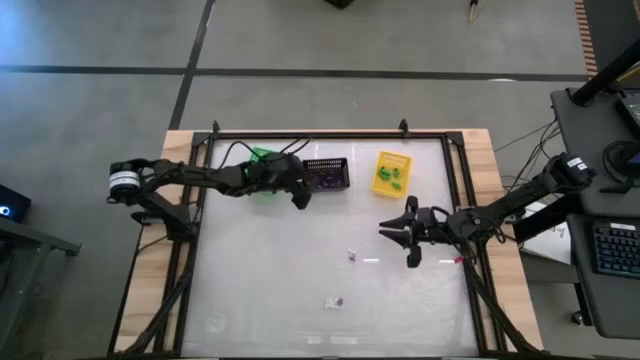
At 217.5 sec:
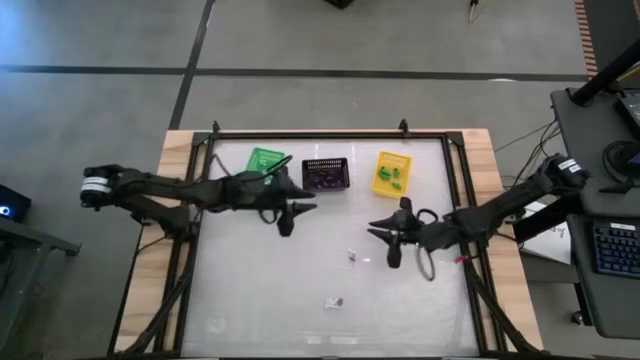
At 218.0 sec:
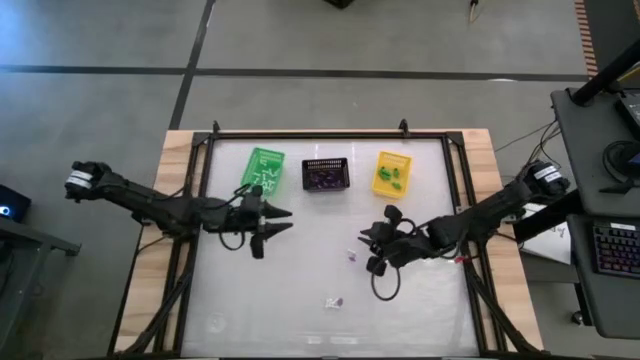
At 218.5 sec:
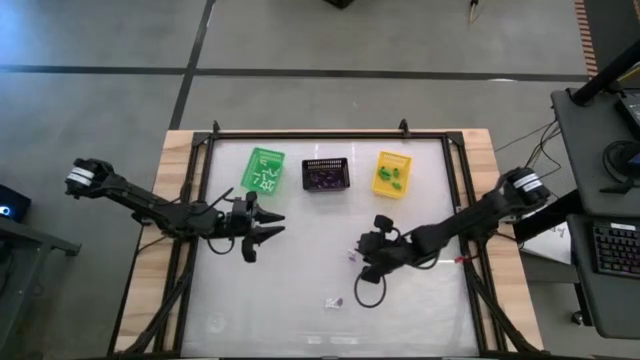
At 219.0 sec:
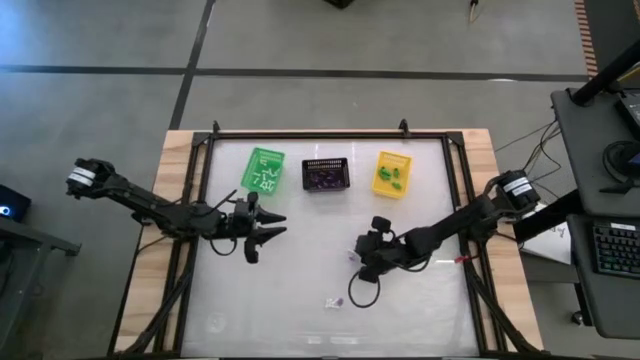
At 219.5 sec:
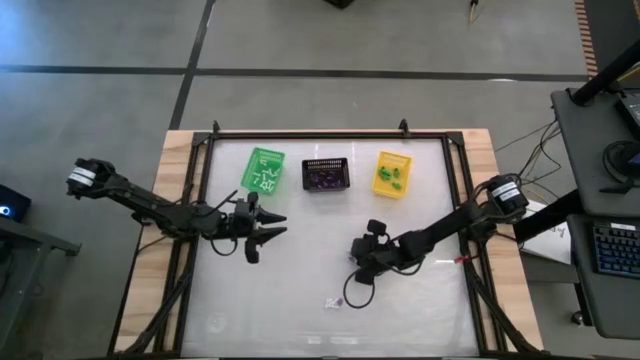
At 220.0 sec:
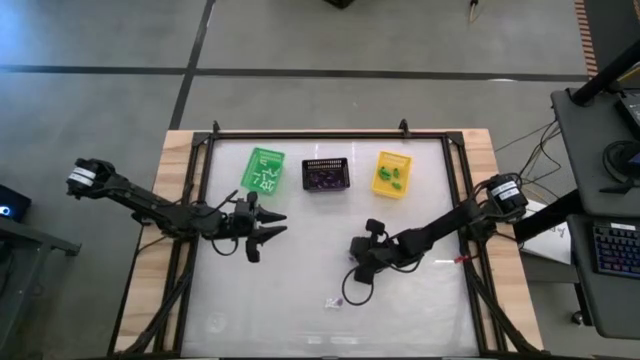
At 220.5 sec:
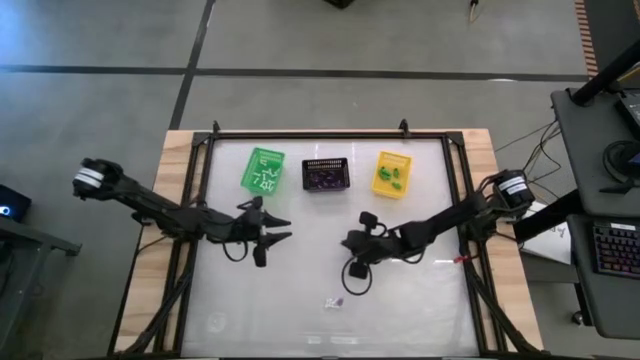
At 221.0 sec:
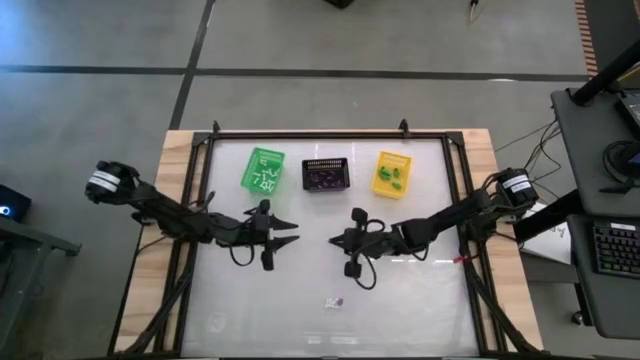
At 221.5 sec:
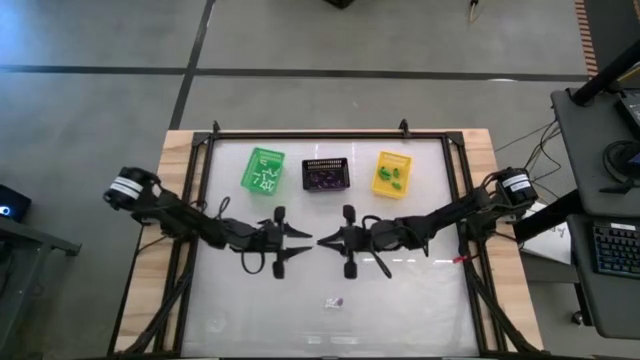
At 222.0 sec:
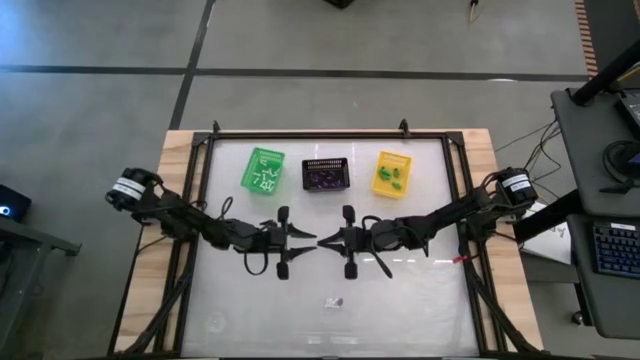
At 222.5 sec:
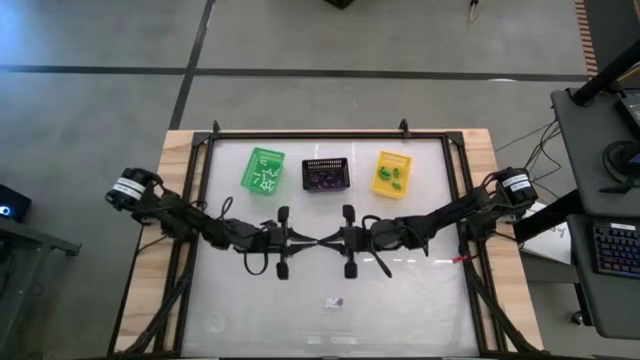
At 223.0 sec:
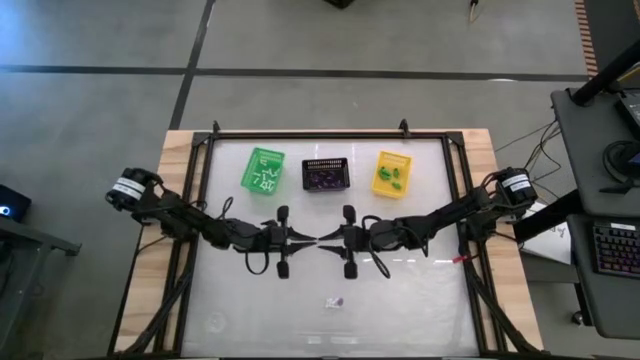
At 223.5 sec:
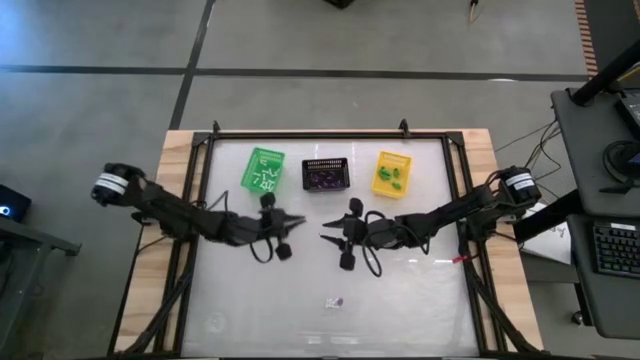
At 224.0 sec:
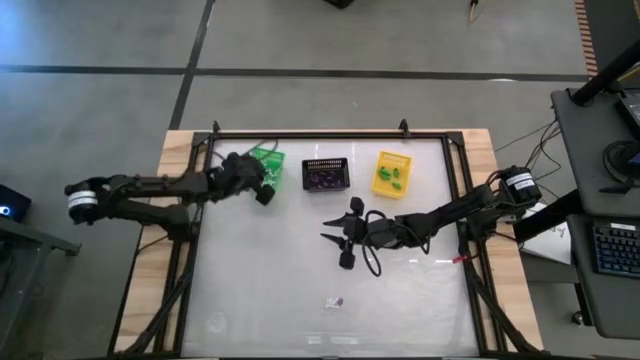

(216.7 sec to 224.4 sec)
Task: Sort Halloween decoration
Put the white bone toy into the green basket

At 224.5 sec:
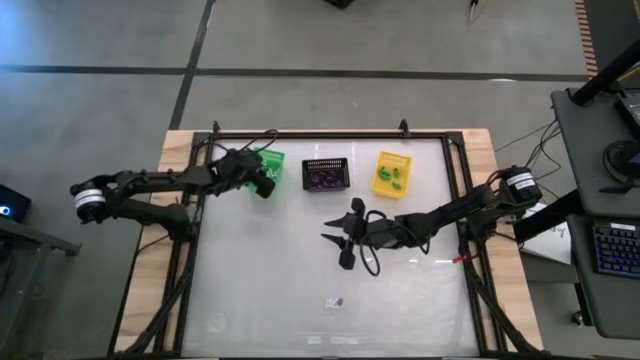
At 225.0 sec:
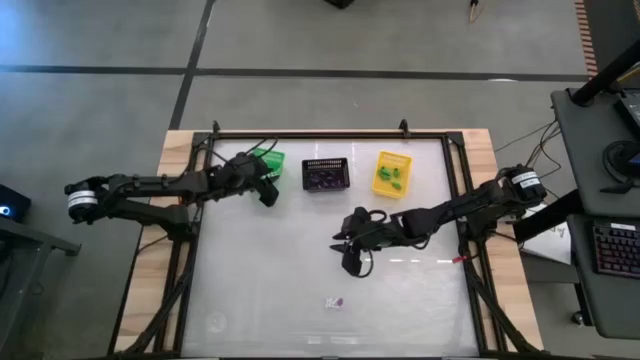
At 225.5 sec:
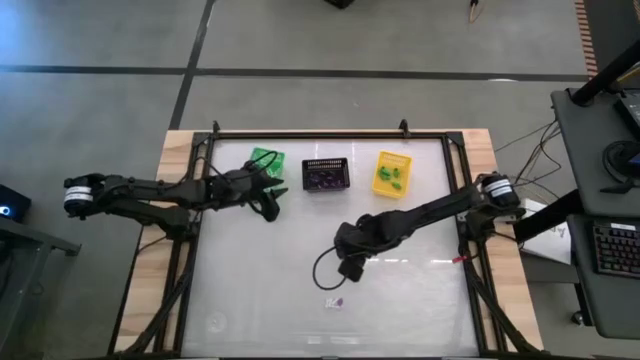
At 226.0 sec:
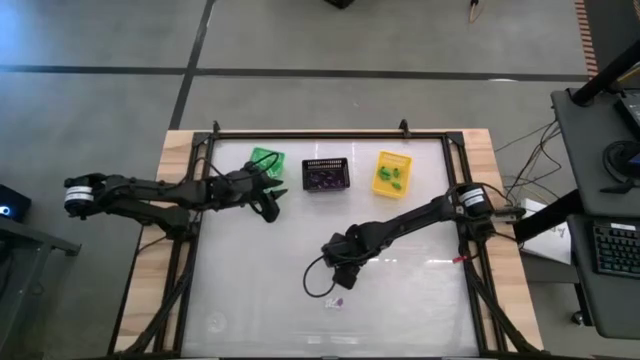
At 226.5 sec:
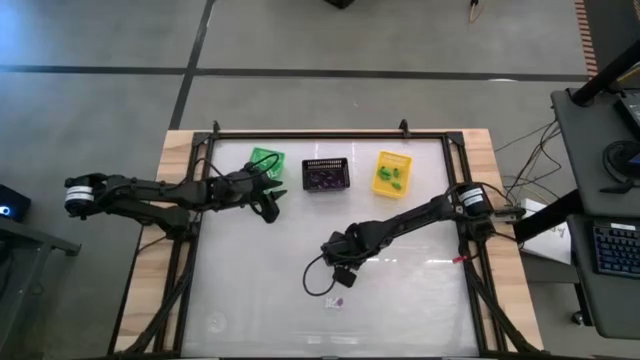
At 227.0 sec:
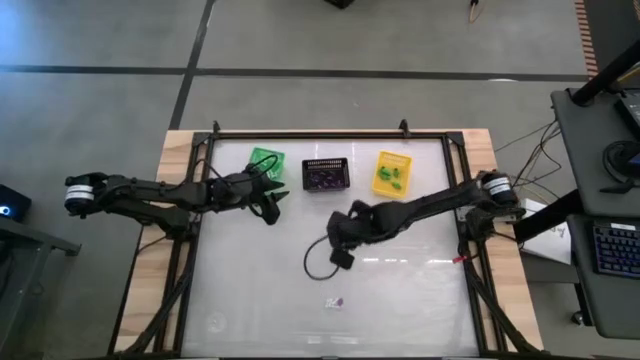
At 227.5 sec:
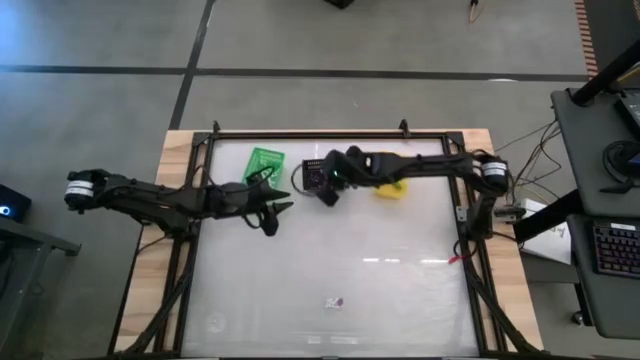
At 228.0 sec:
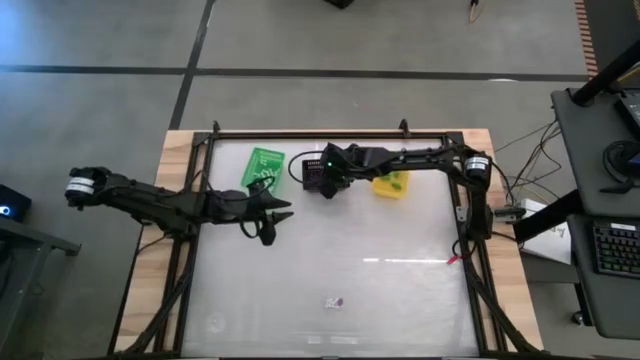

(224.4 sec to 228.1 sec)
Put the purple witch hat toy into the black basket

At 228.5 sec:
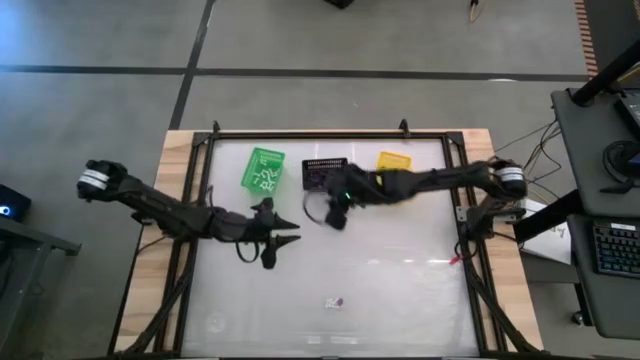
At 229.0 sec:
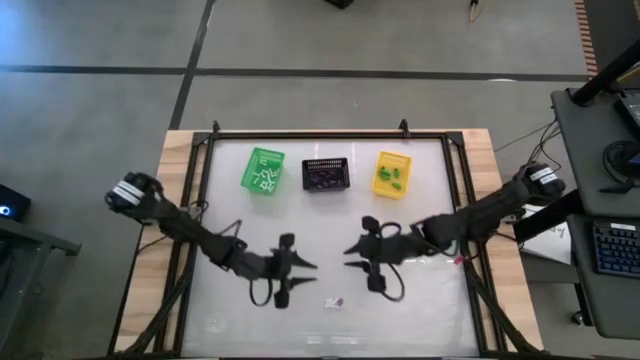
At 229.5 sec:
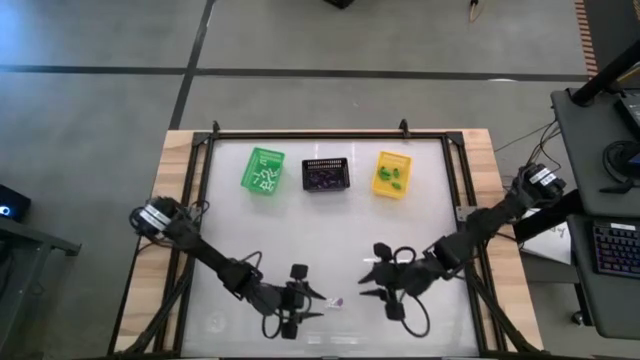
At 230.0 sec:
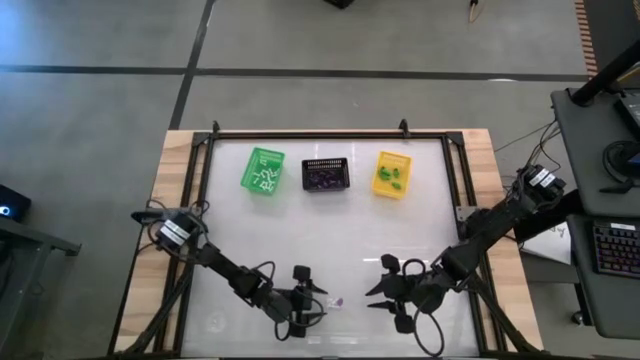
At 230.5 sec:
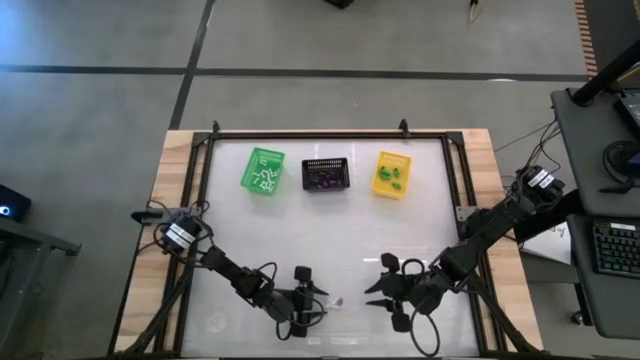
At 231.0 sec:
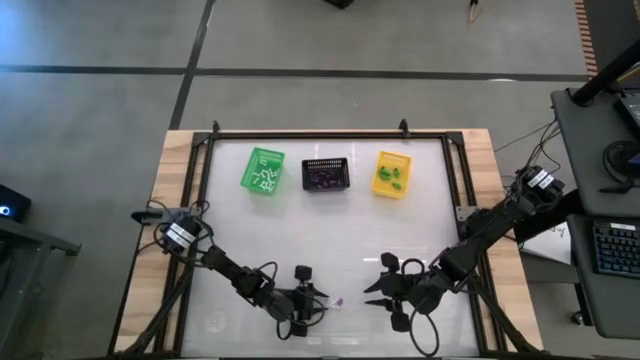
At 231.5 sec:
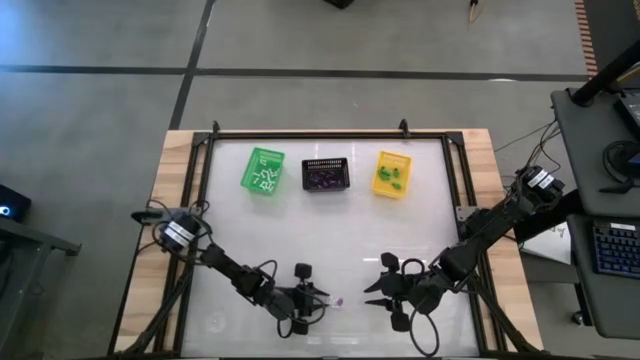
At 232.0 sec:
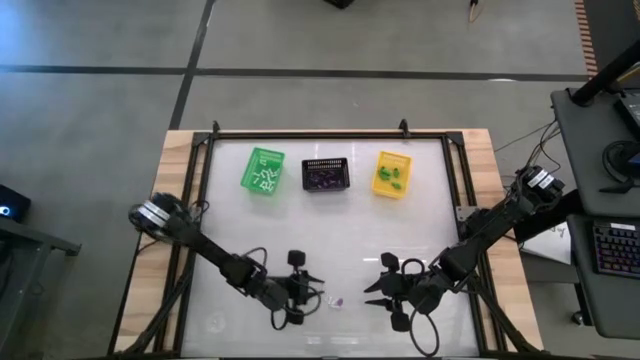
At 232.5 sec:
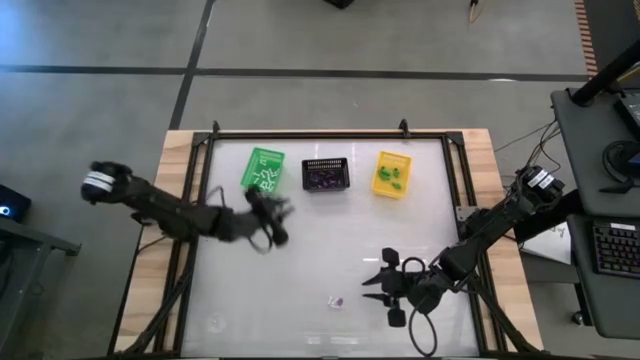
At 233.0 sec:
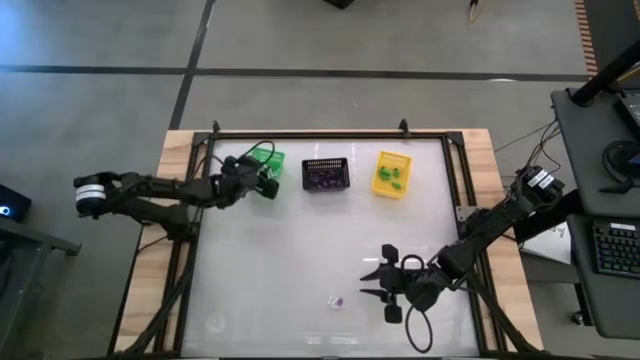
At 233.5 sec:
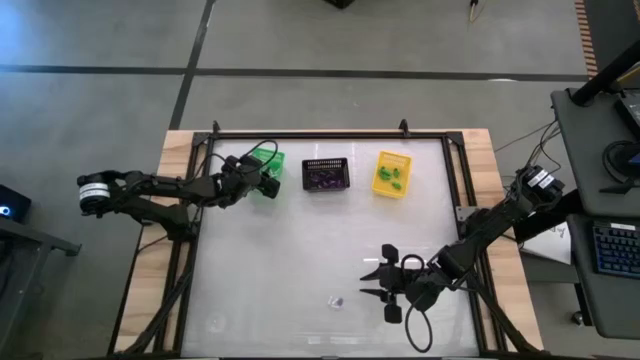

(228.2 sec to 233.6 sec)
Put the white bone toy into the green basket

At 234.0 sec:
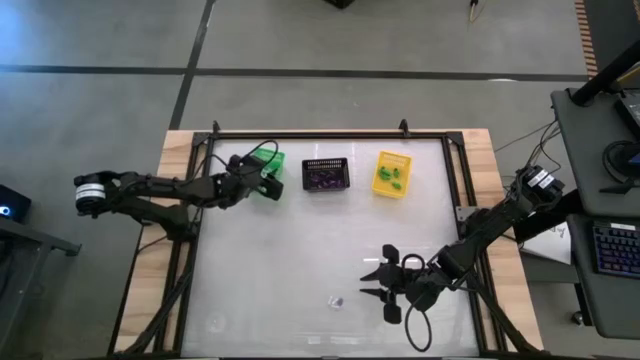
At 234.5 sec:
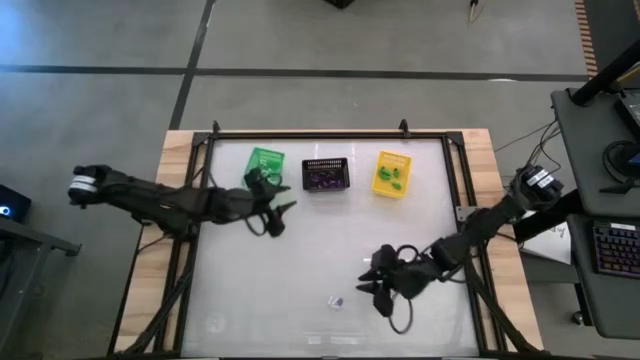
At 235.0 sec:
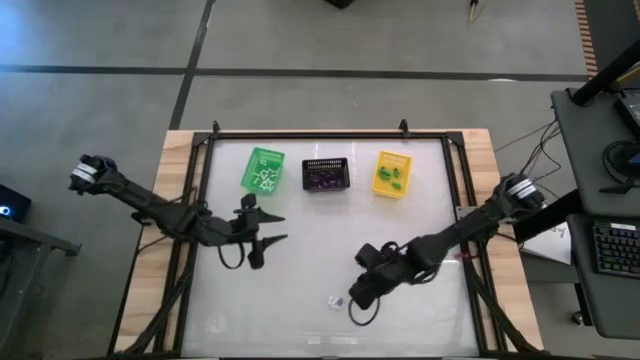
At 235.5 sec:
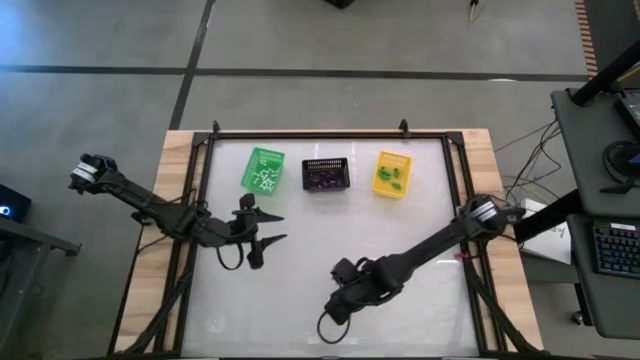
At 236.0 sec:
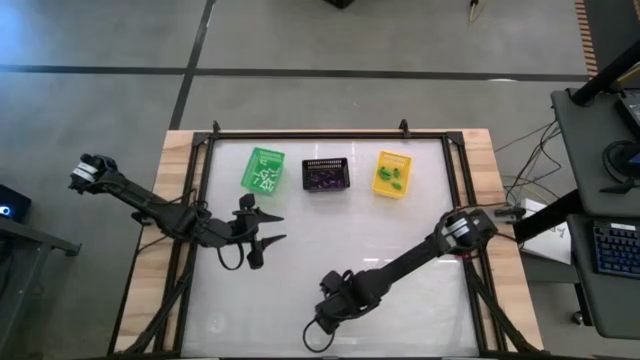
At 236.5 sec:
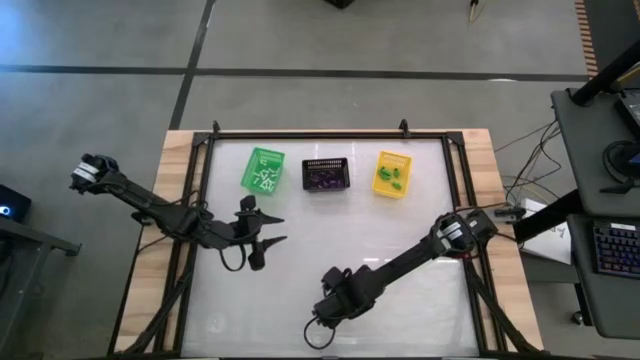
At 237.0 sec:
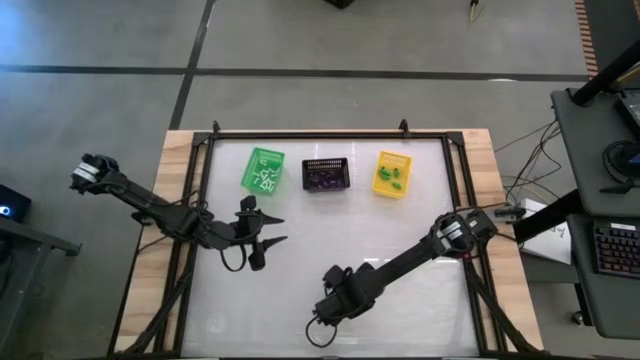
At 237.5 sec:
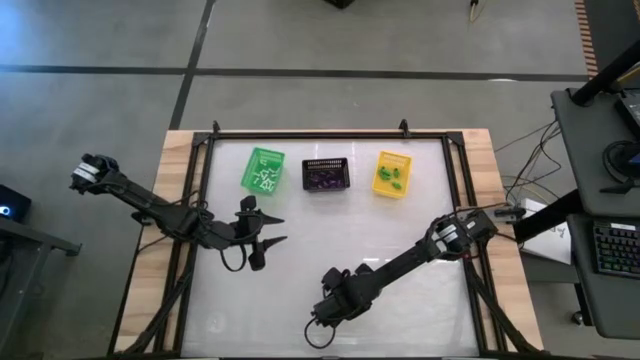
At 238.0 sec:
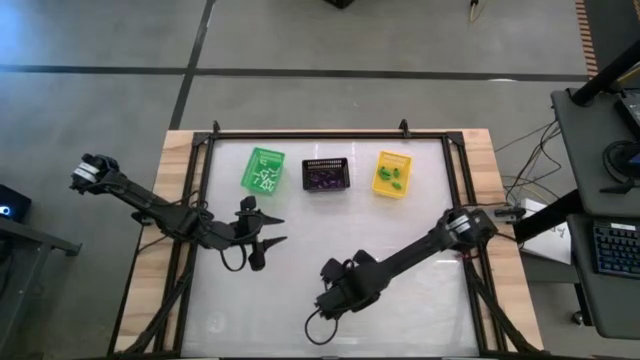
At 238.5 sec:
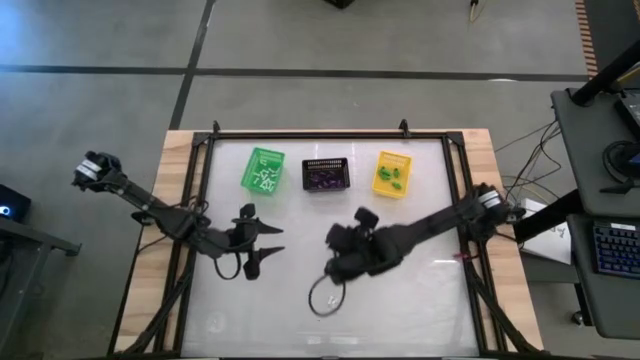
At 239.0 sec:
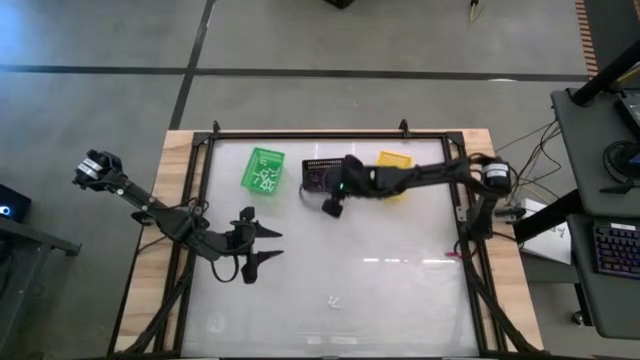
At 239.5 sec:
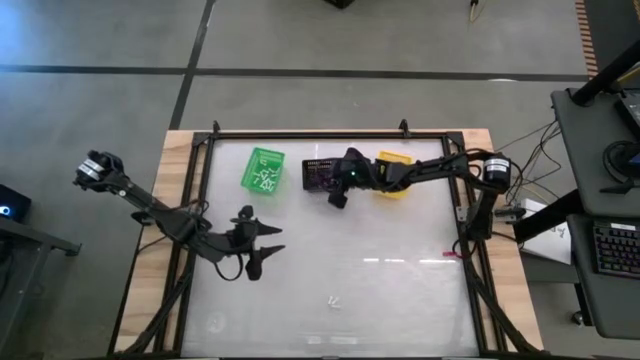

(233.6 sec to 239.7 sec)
Put the purple witch hat toy into the black basket
